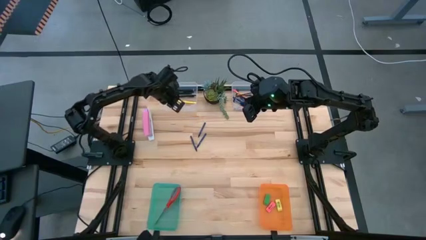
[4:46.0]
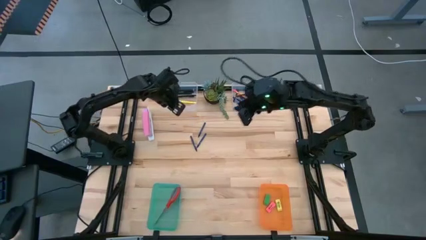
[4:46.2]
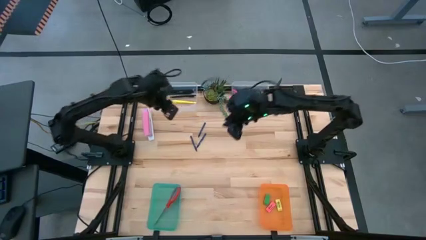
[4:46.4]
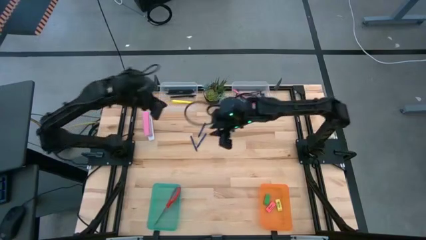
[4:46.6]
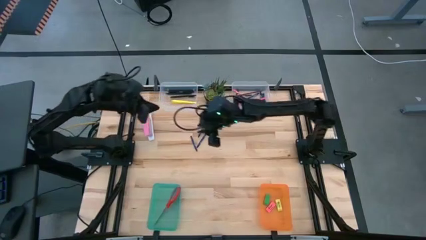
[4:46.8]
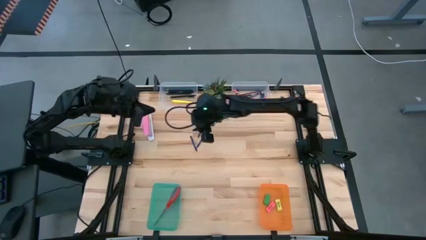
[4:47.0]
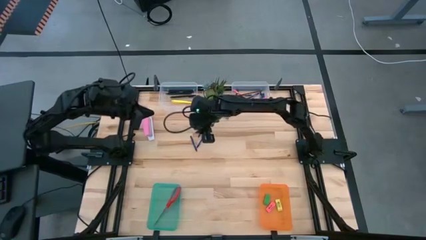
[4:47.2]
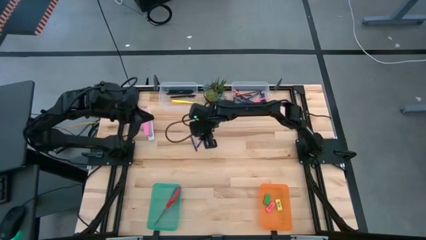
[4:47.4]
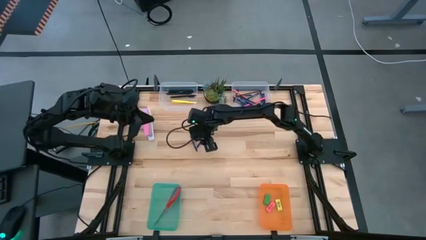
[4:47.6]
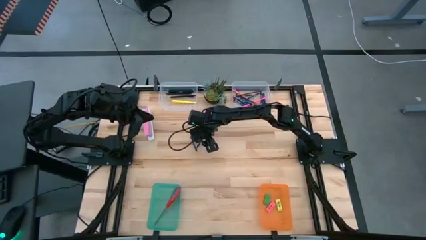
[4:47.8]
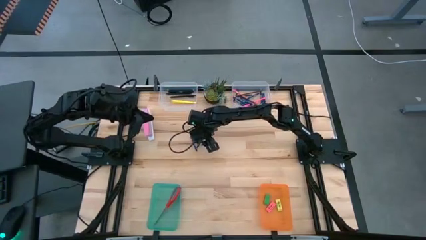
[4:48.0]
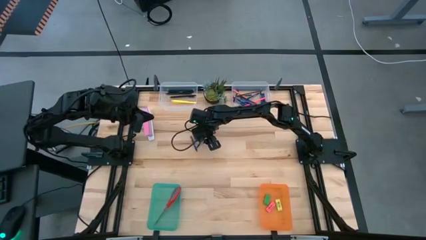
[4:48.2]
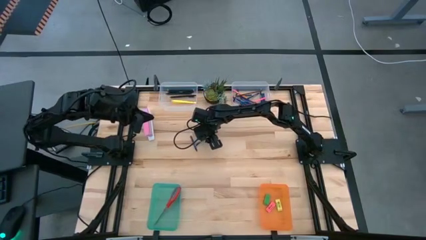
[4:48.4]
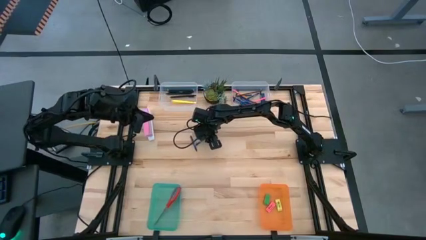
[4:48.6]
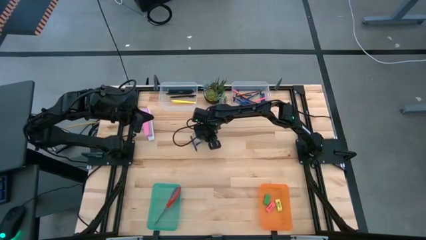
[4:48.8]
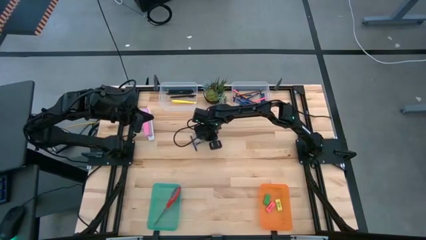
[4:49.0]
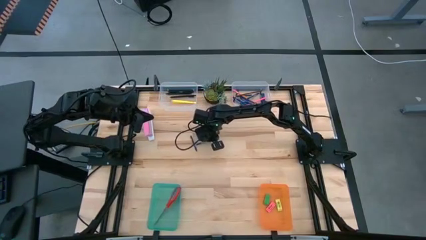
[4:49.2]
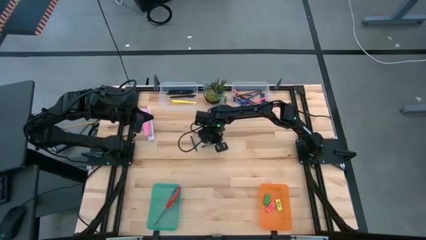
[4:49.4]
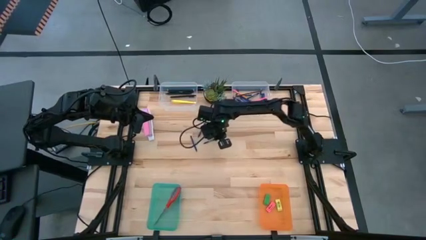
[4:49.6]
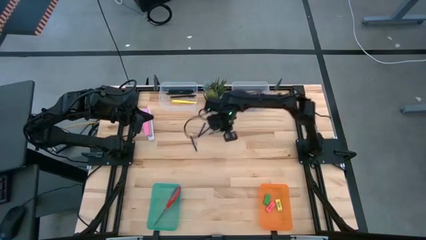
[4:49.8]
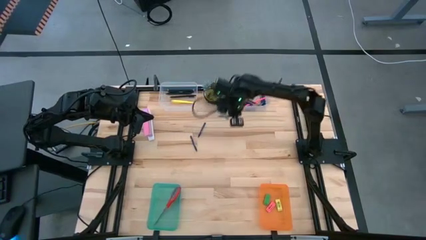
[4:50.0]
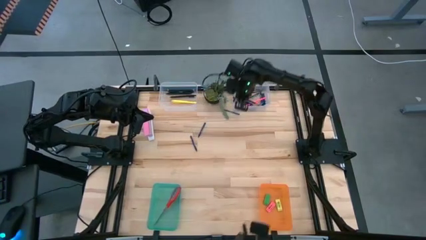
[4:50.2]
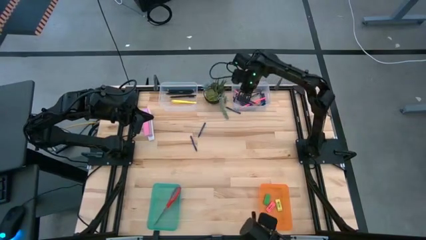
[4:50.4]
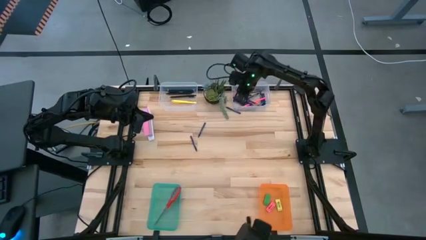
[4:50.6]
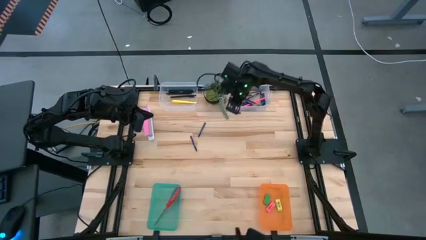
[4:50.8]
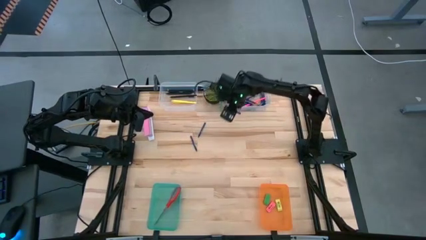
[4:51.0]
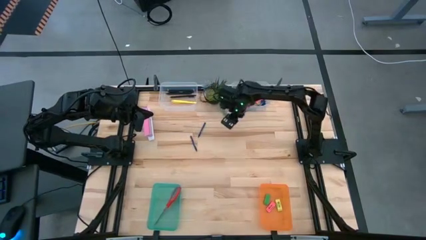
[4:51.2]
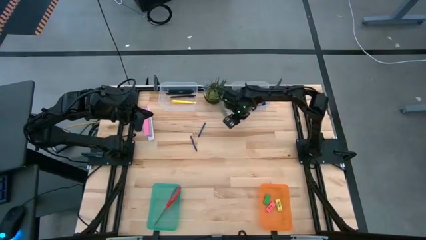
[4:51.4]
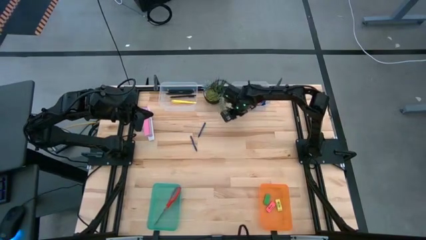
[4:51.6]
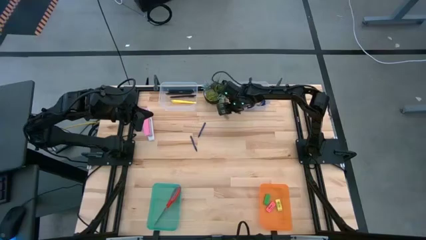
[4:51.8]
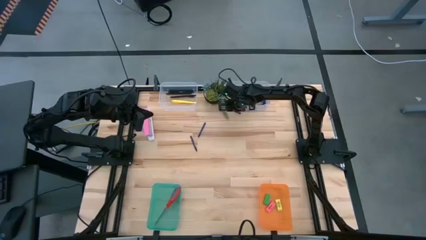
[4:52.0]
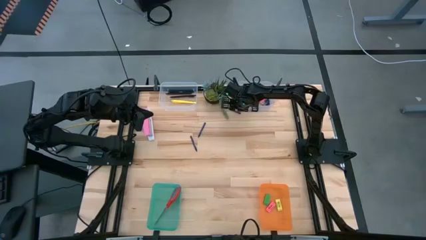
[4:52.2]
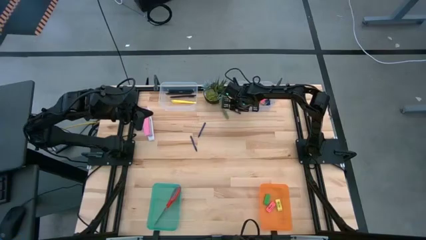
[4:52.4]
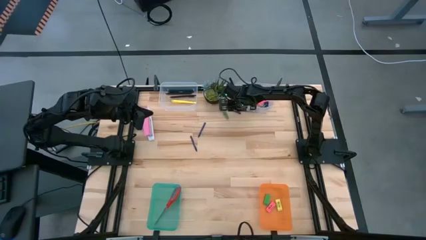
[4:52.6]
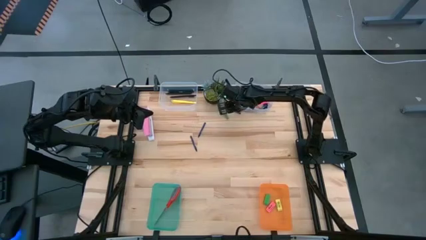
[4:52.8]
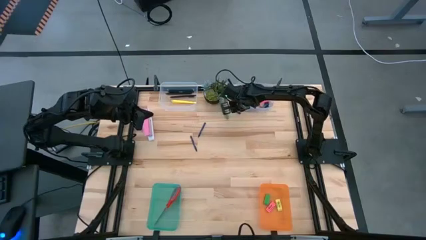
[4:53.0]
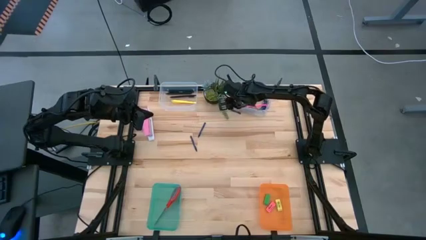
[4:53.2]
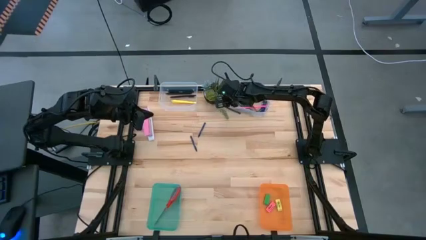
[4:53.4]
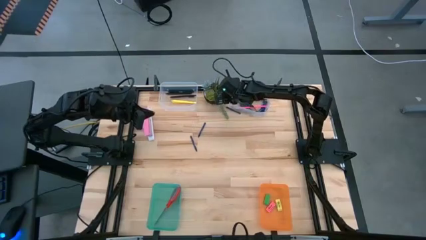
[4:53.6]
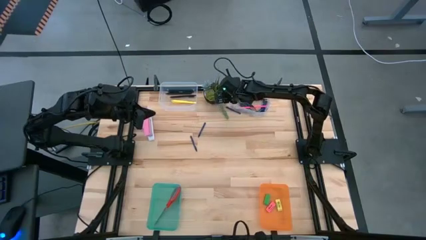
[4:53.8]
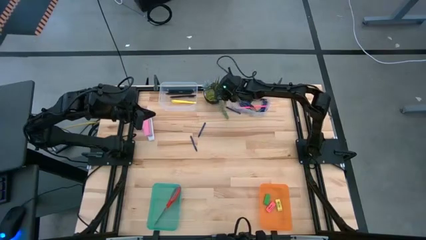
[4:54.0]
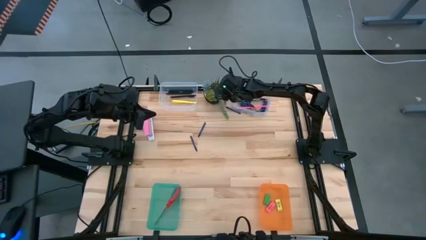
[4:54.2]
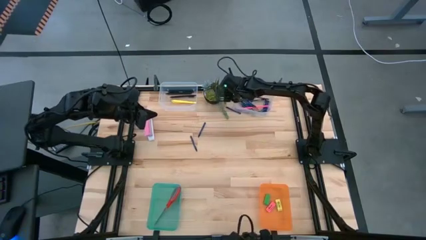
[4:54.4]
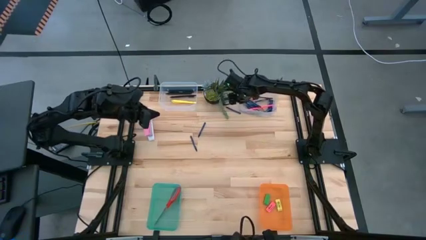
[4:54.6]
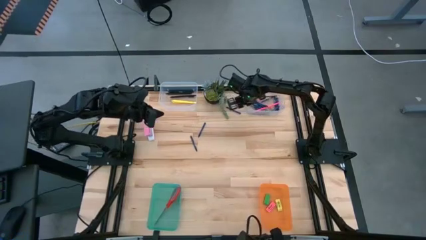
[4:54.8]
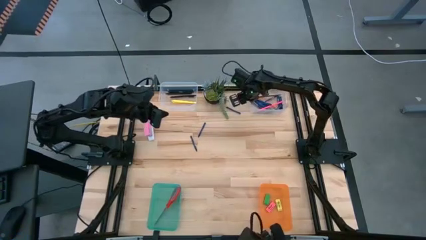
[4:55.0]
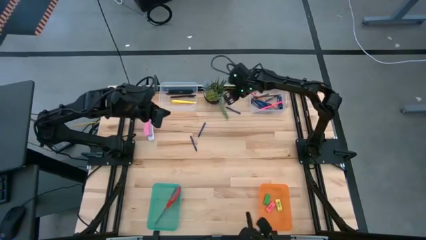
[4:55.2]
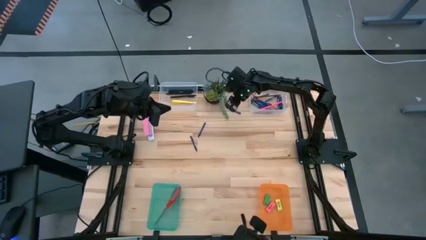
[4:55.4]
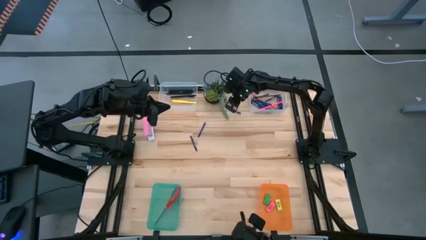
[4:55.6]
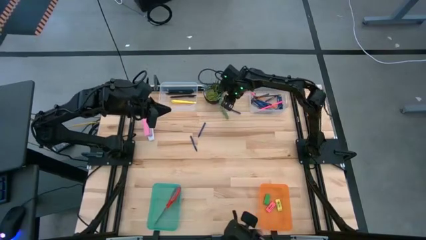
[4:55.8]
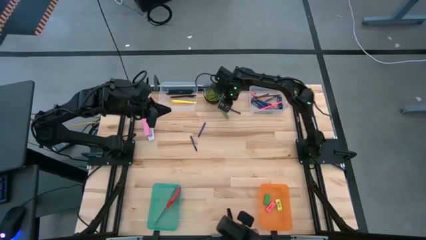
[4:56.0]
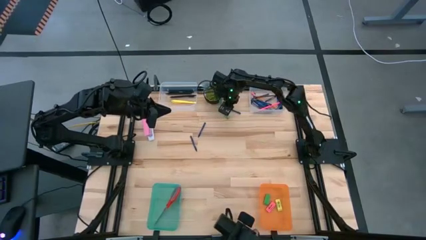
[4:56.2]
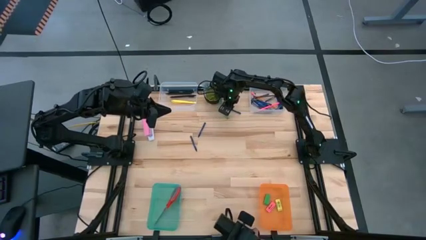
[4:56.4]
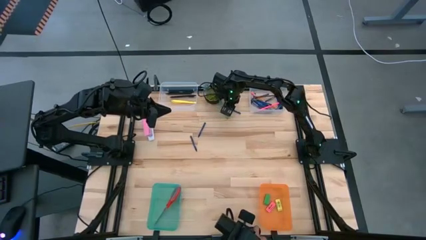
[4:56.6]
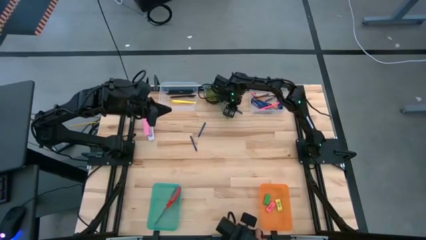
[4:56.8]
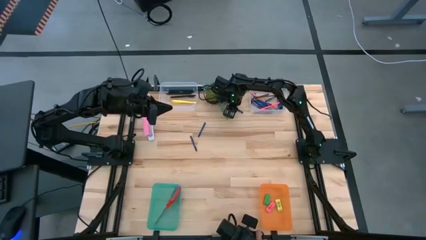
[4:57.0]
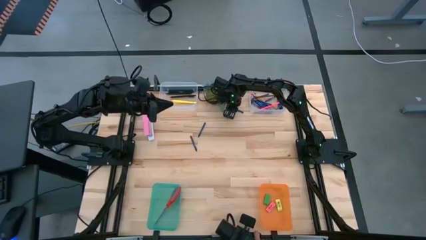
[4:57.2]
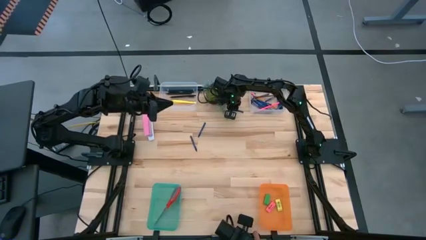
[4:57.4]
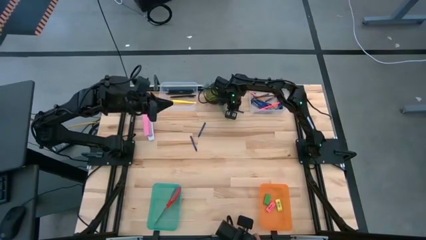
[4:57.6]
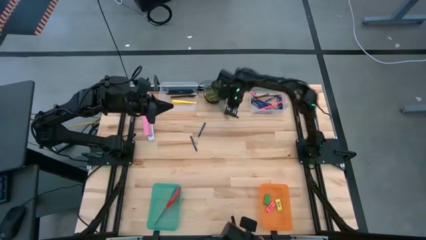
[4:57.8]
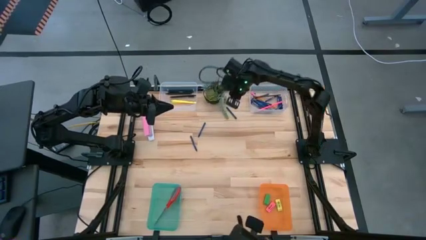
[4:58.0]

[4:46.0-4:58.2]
Task: Sort crayons/erasers/pens/pencils in bins
Put the blue crayon into the right transparent bin

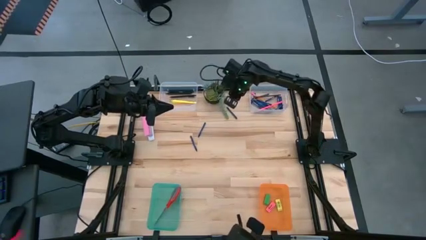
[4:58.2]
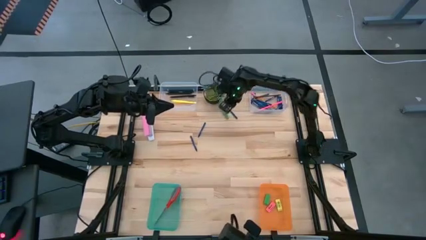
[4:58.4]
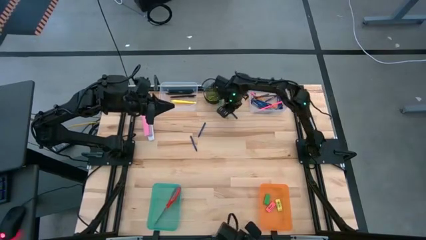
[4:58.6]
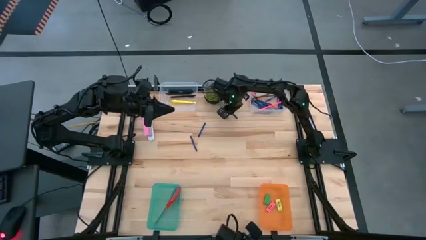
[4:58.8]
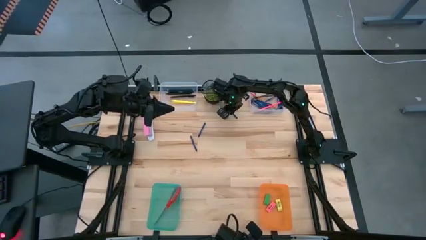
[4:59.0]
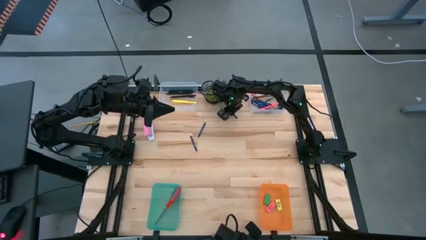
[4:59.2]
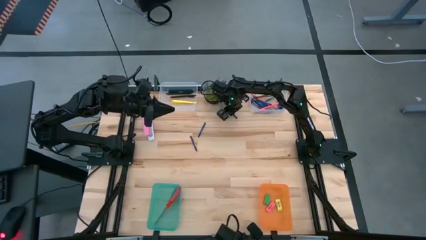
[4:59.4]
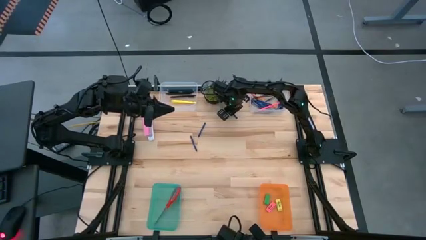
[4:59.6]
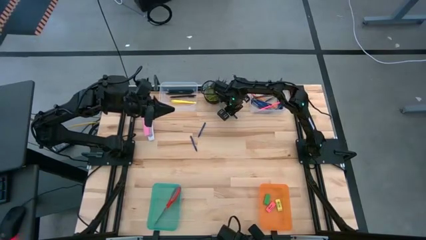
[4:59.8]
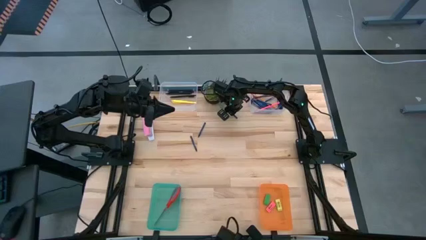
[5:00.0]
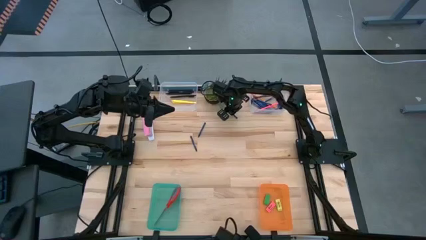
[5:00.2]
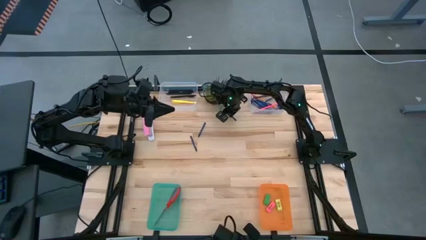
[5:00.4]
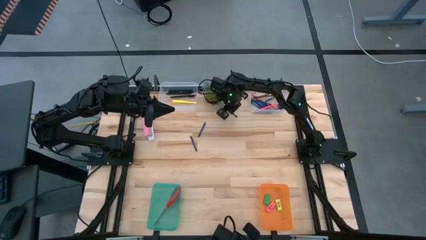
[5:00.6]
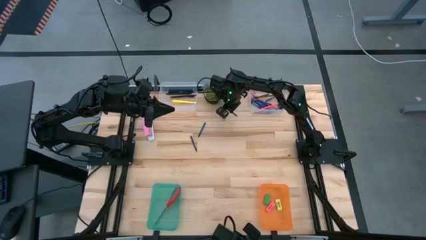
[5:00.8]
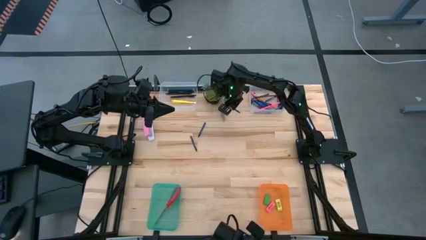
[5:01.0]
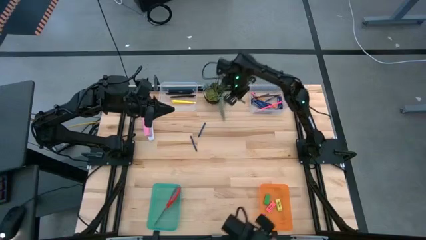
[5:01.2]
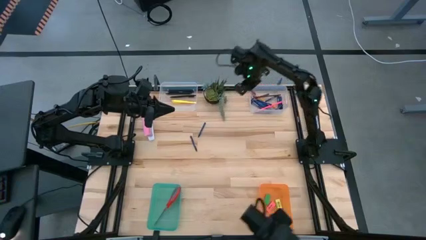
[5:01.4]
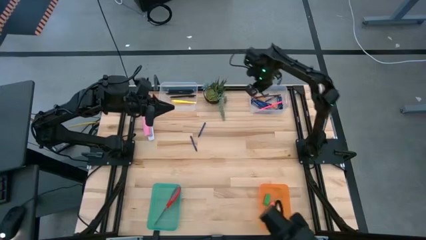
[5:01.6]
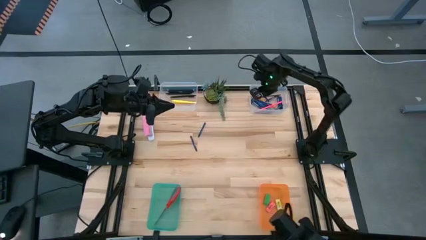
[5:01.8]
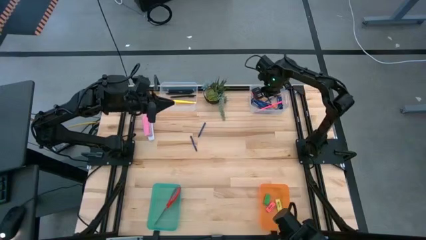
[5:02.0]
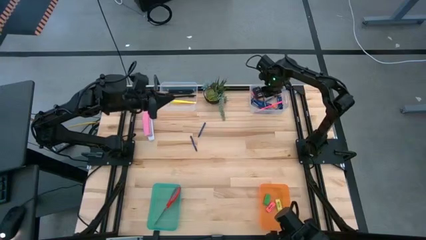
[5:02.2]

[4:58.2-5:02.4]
Put the blue crayon into the right transparent bin
